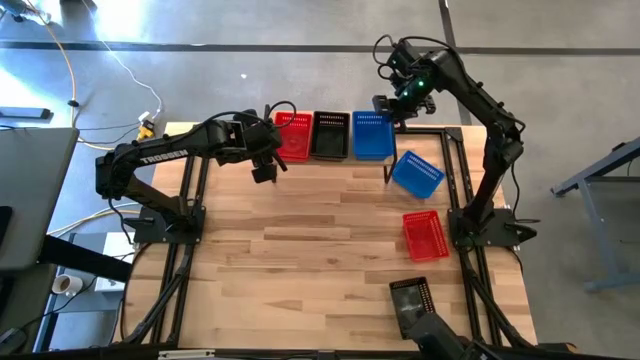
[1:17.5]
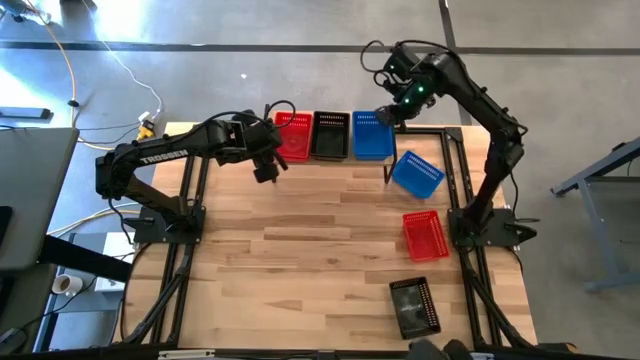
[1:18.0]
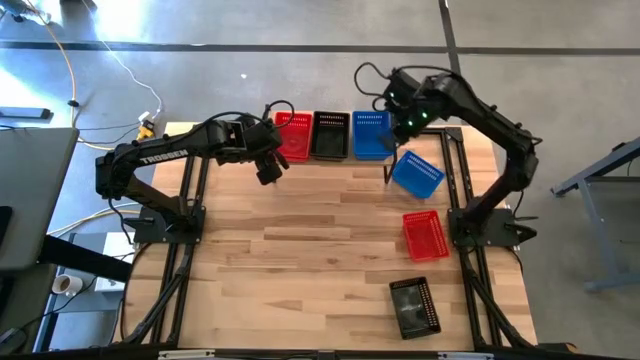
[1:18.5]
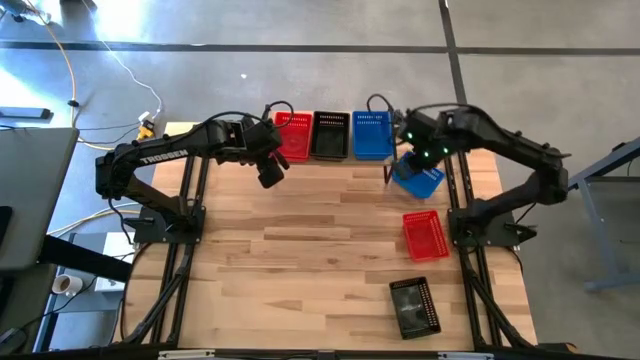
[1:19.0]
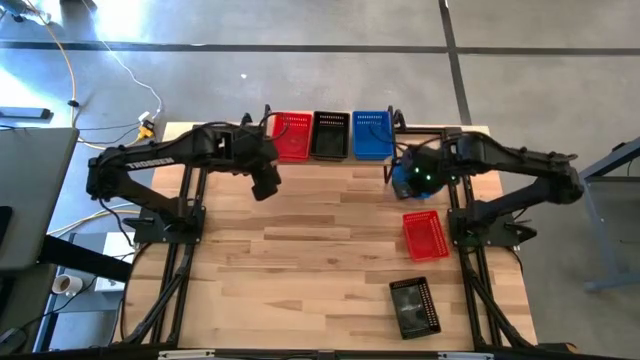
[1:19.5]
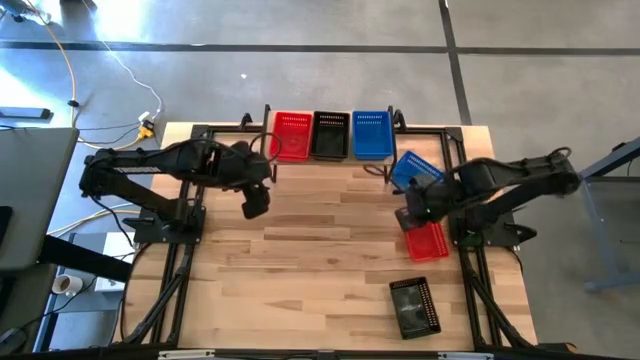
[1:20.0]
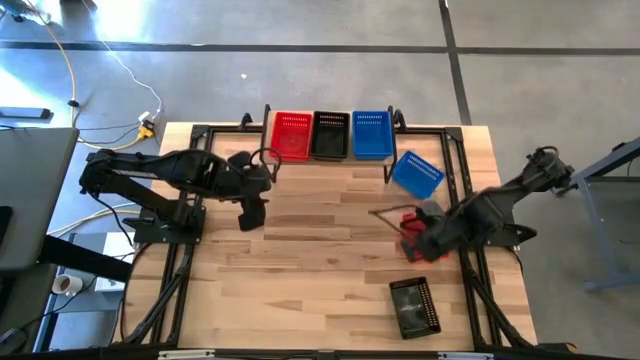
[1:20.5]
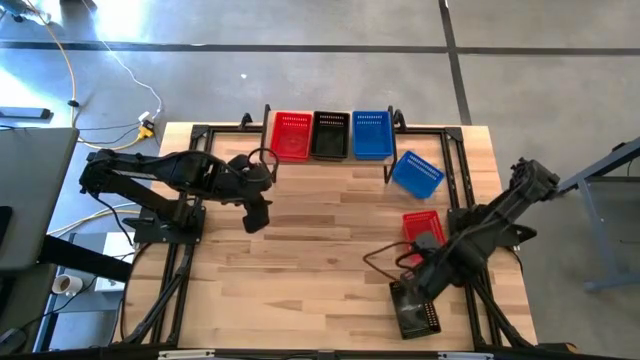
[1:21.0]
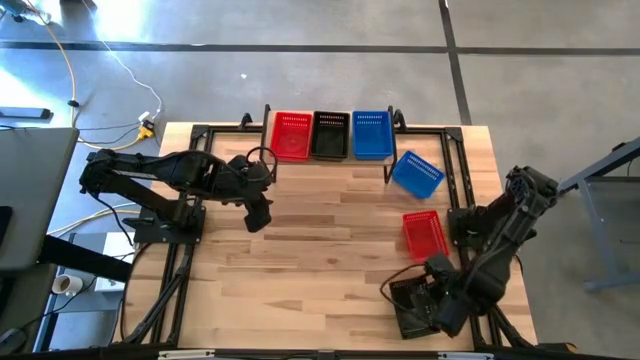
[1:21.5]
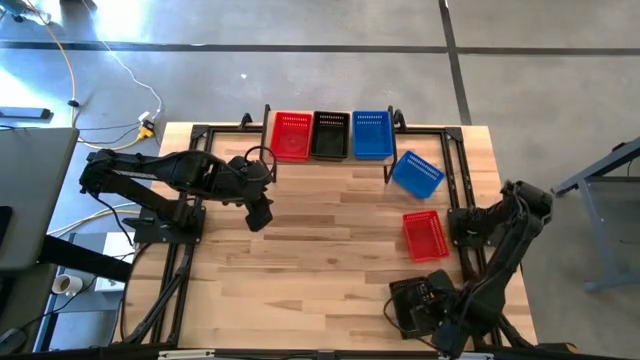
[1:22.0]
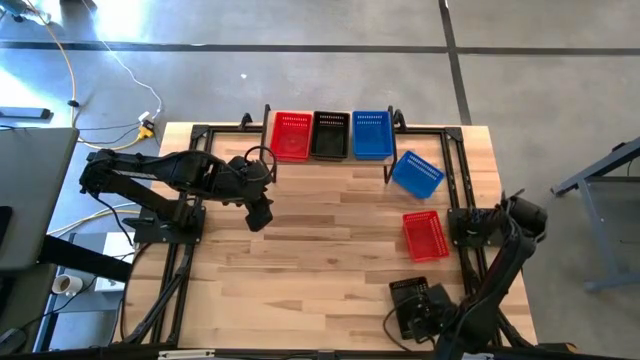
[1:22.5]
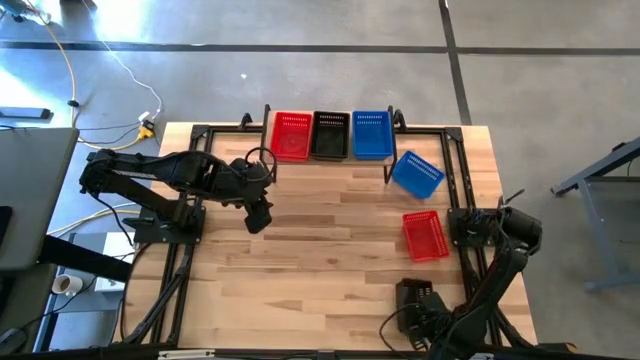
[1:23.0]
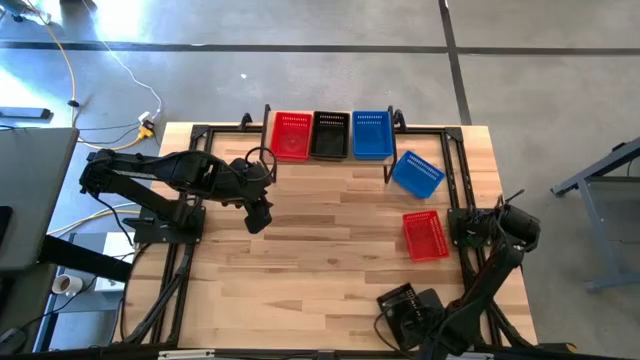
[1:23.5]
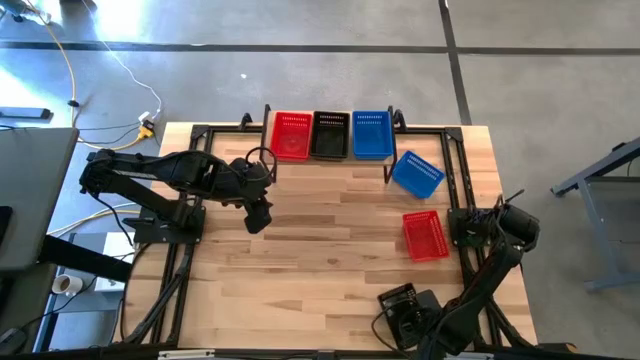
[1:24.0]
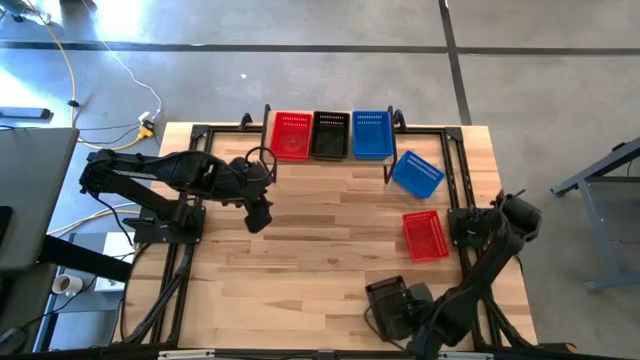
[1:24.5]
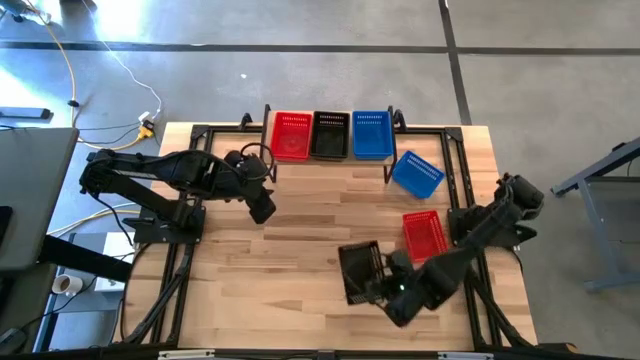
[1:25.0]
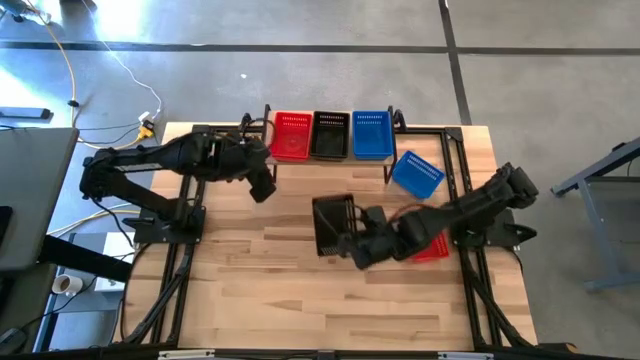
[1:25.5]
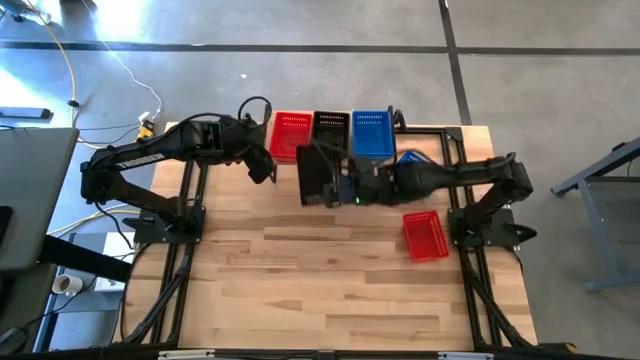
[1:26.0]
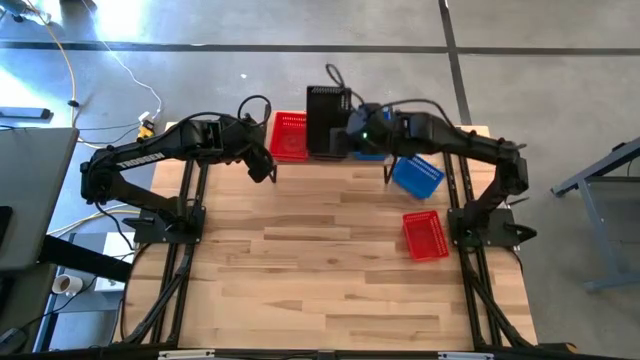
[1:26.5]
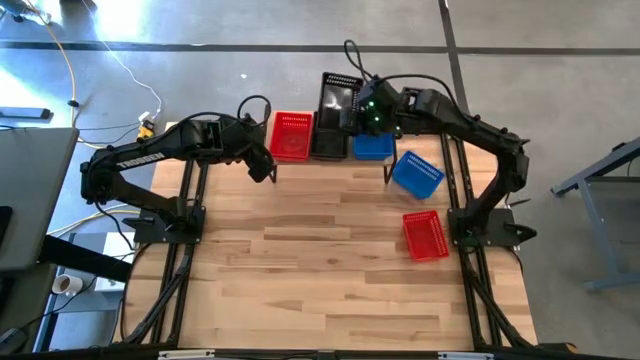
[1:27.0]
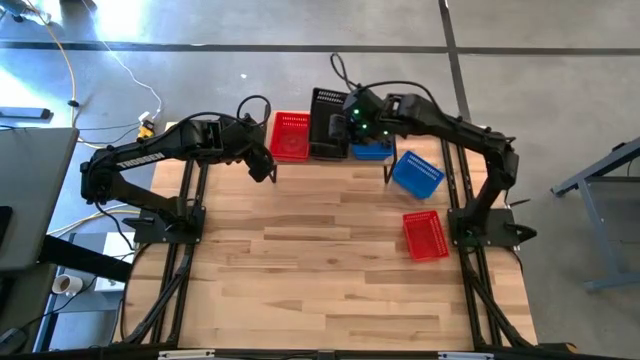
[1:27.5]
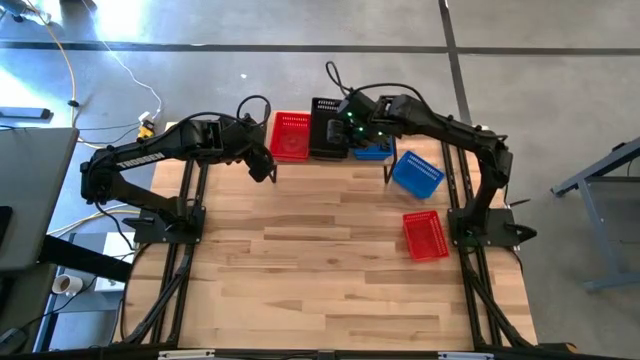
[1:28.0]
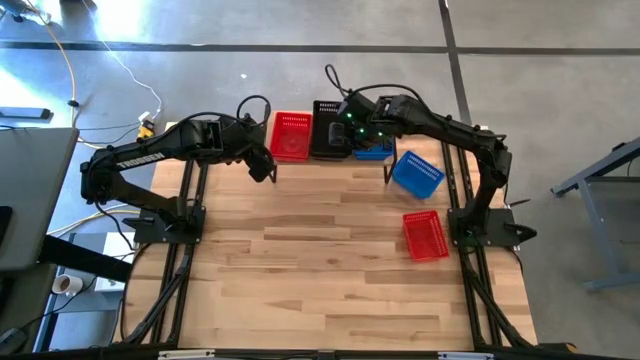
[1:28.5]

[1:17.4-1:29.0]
Task: Stack baskets on shelf by color
Stack the black bin on top of the black bins on the shelf

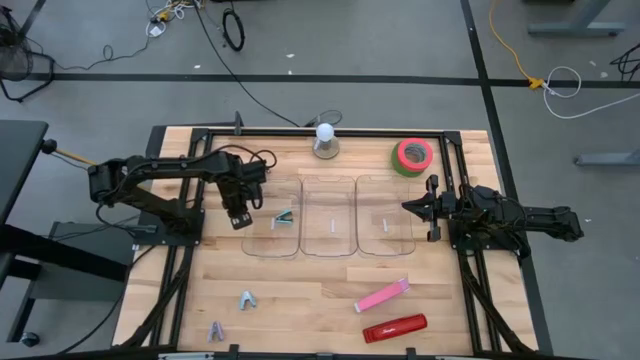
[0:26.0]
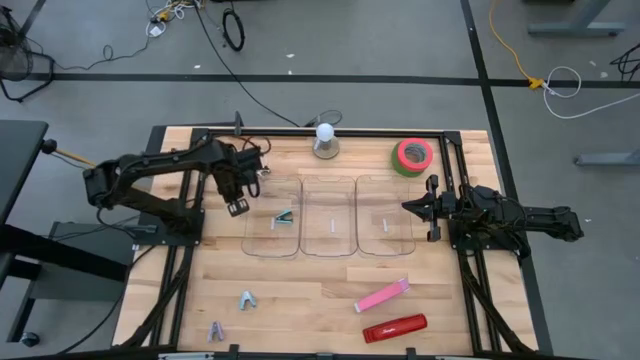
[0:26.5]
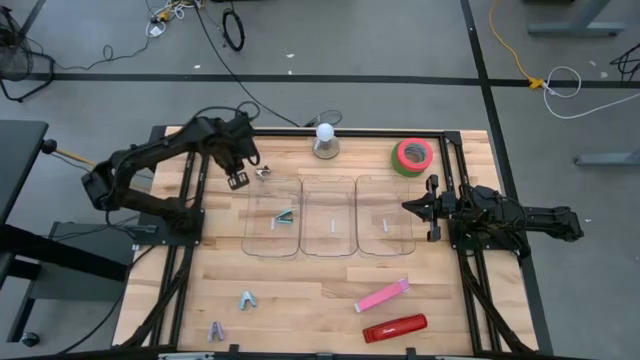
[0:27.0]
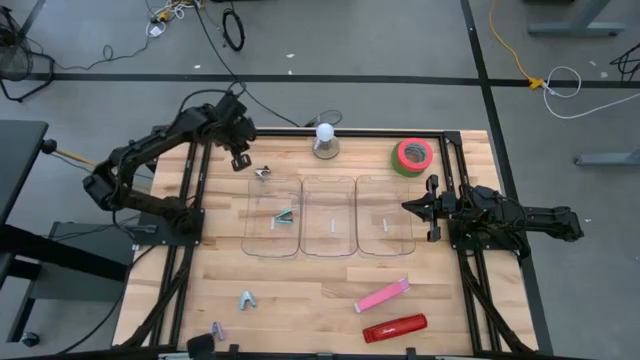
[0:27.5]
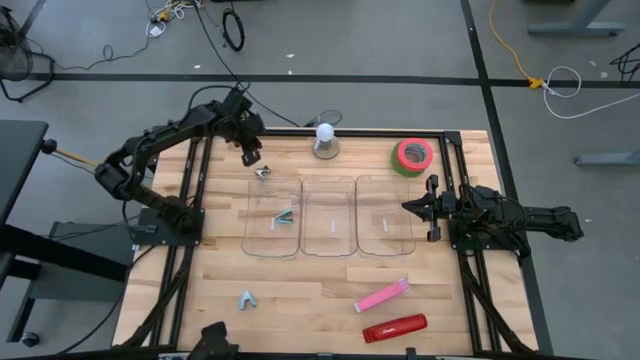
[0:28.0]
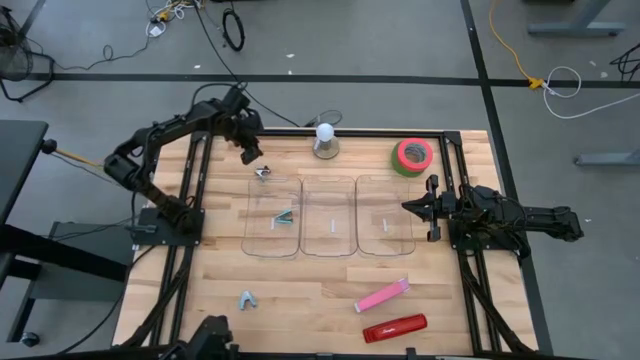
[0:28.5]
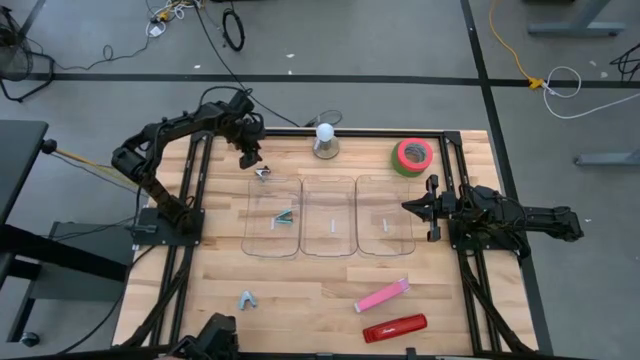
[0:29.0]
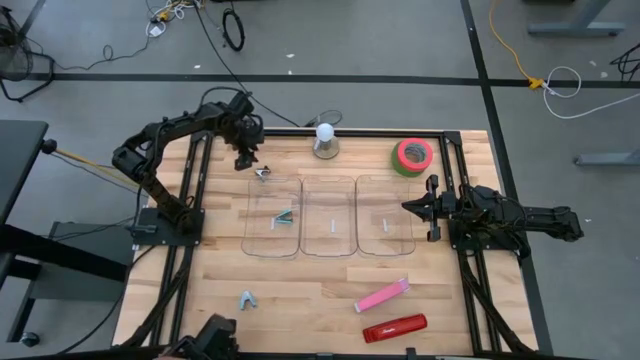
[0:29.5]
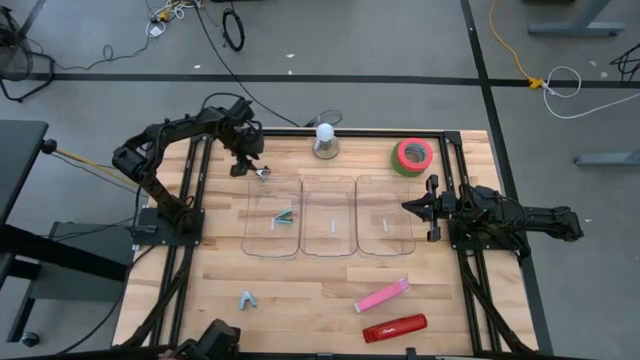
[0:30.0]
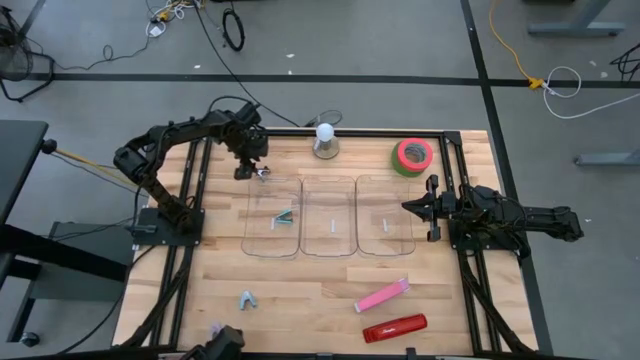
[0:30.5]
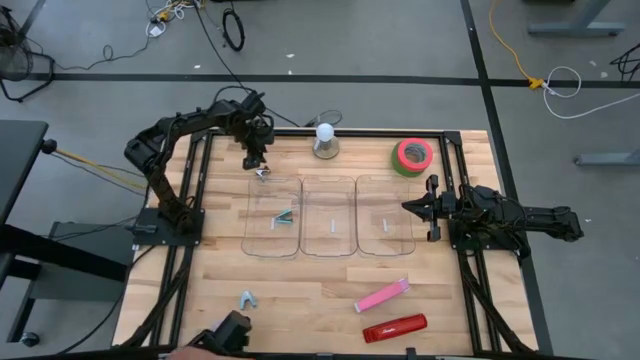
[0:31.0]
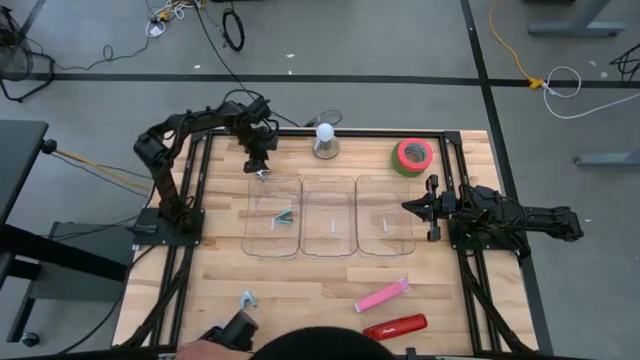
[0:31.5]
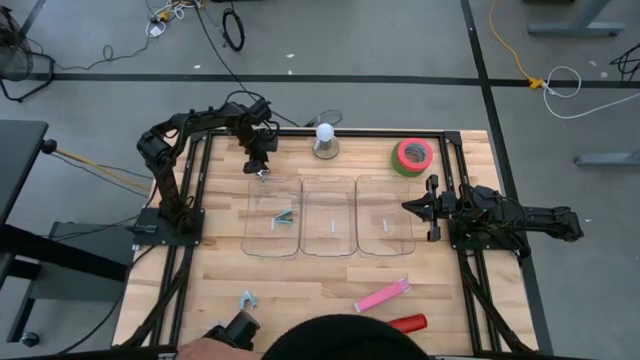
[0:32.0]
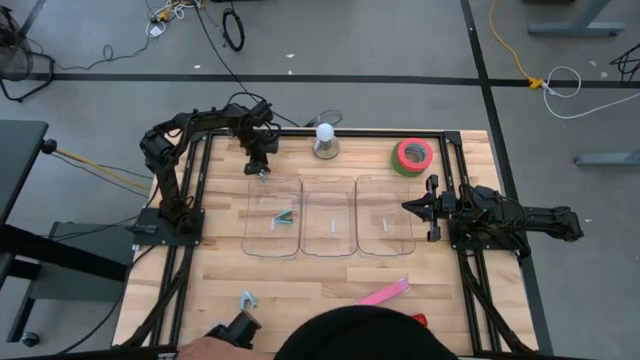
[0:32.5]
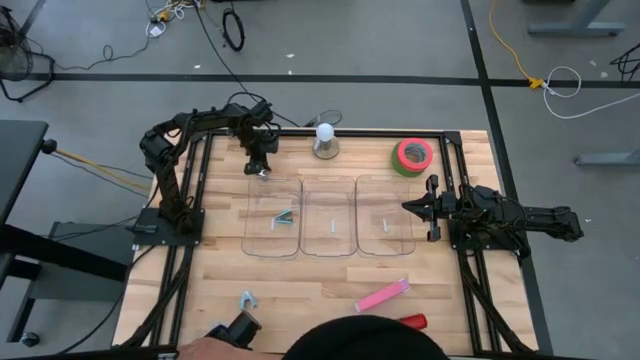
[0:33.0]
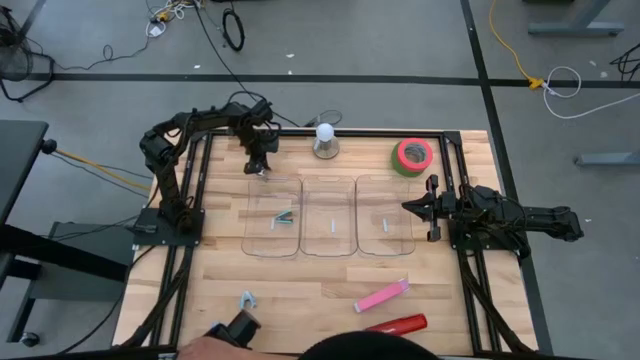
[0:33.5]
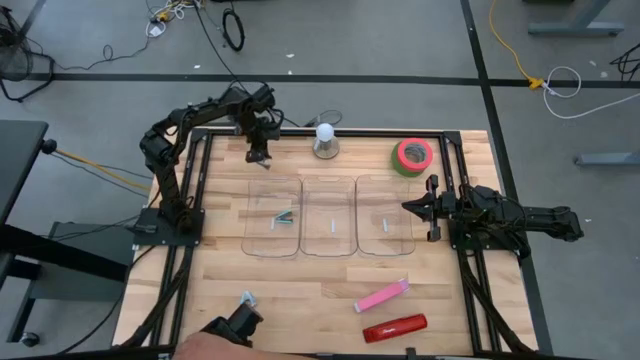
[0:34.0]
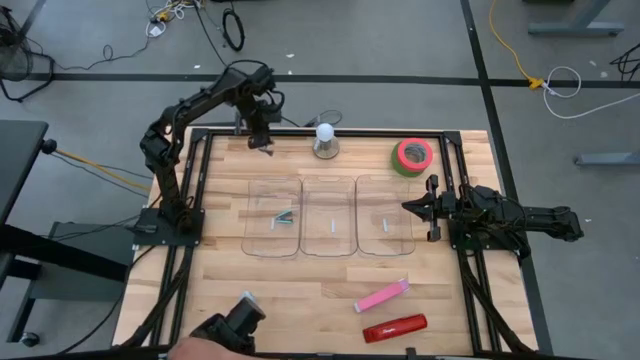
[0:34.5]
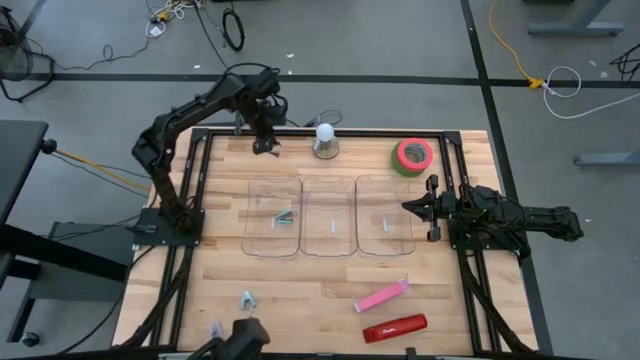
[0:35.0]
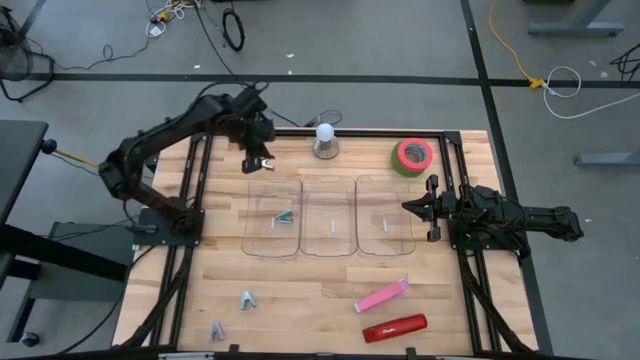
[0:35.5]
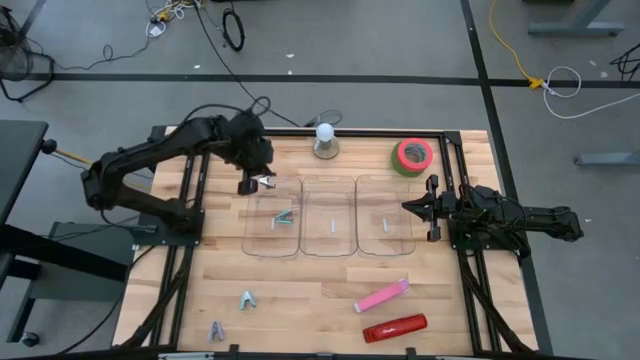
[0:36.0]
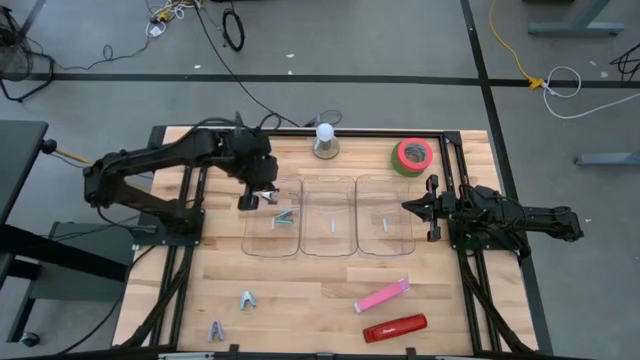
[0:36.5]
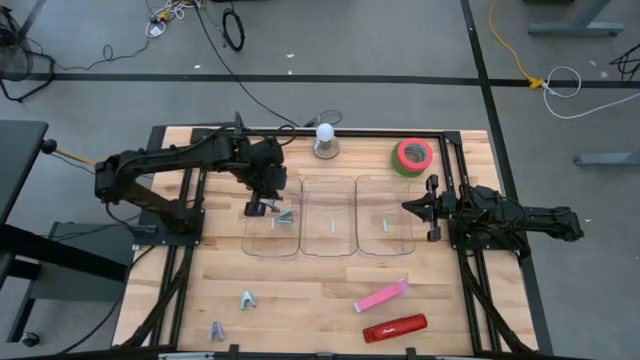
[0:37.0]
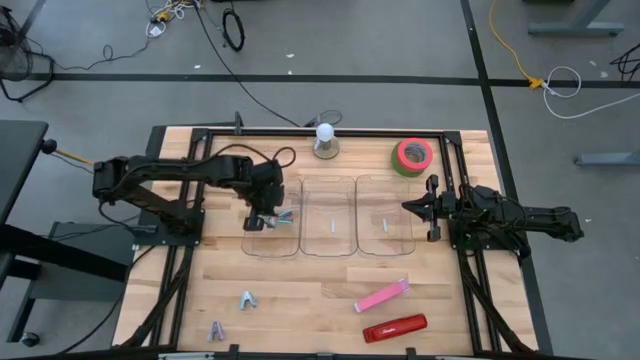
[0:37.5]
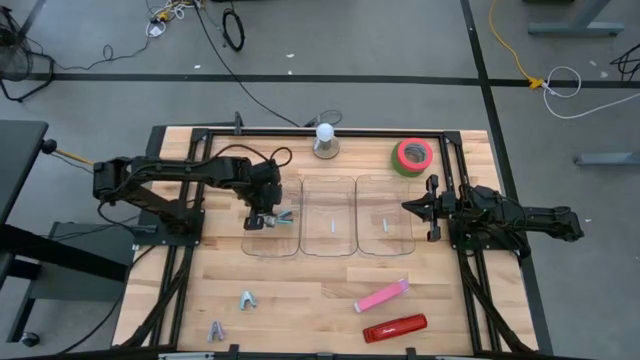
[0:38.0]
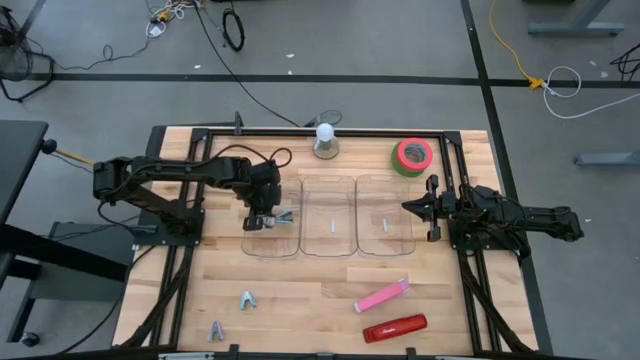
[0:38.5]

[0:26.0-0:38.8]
Task: Pick and place Stapler, Stapler remover, tape
Put the black staple remover into the left transparent bin
